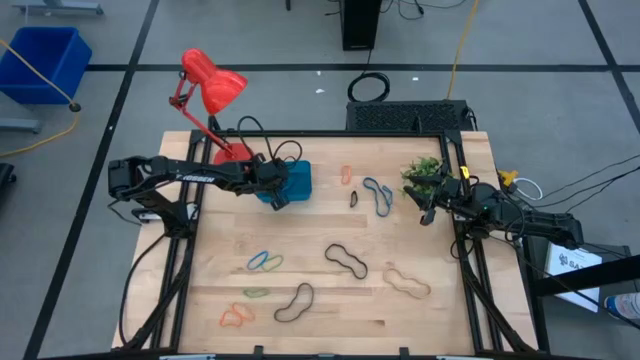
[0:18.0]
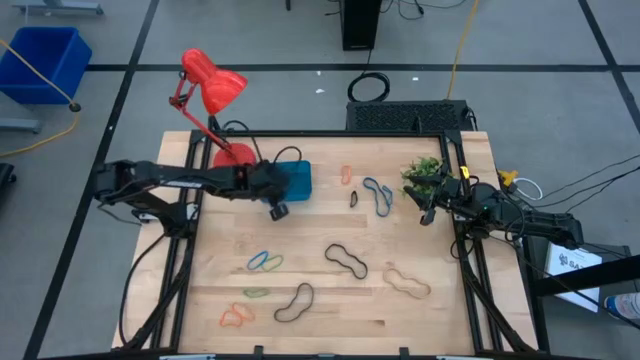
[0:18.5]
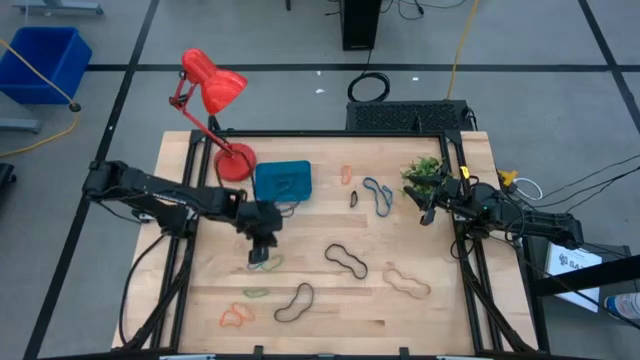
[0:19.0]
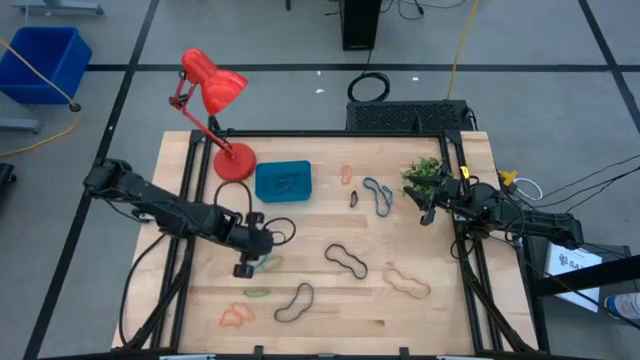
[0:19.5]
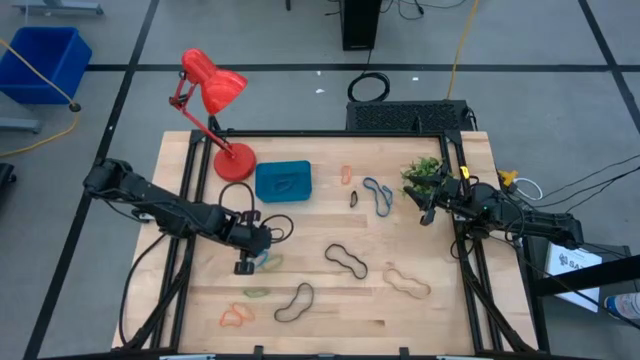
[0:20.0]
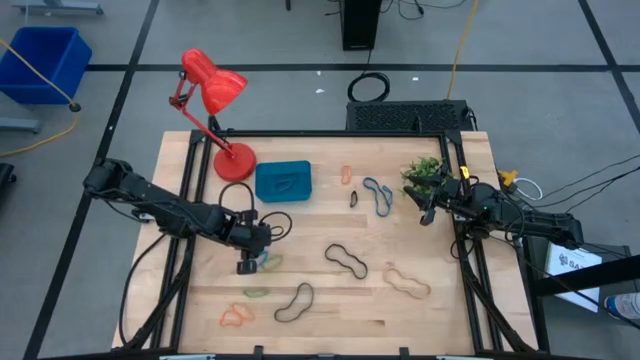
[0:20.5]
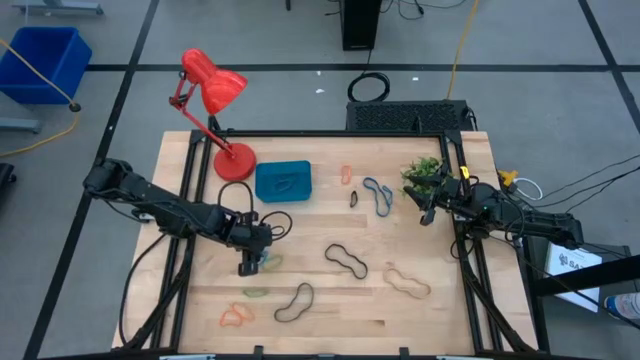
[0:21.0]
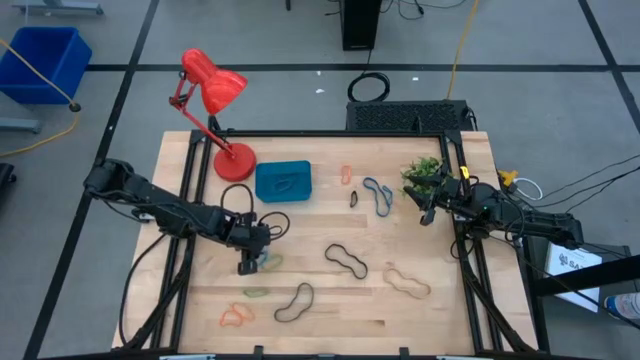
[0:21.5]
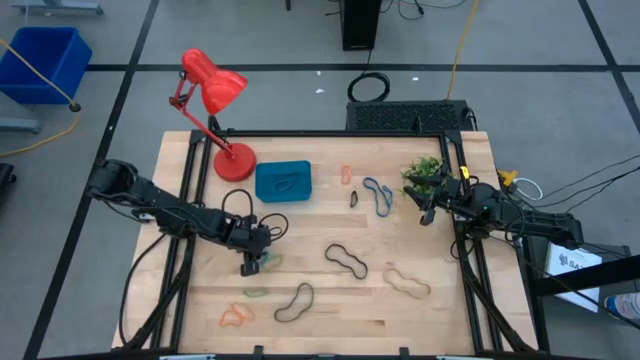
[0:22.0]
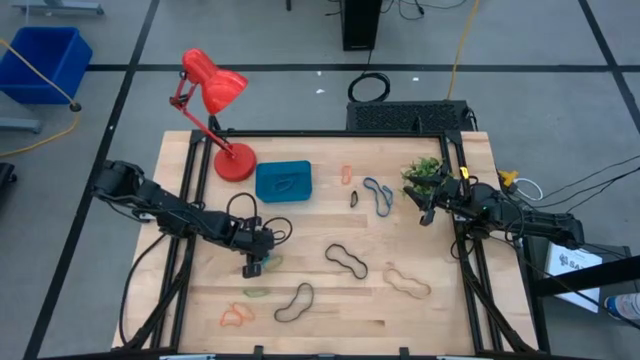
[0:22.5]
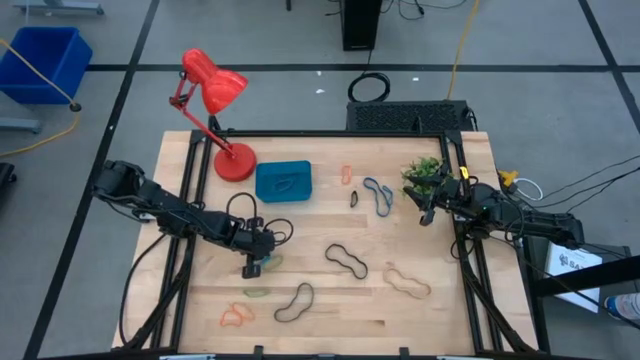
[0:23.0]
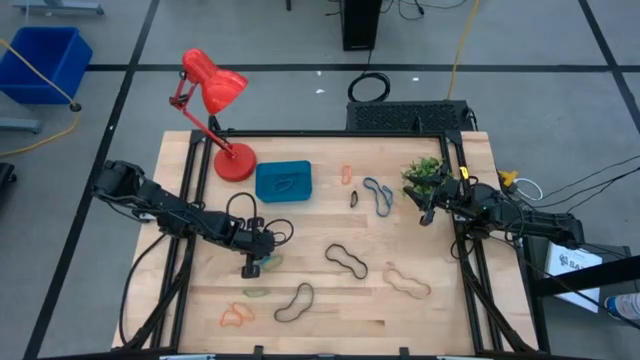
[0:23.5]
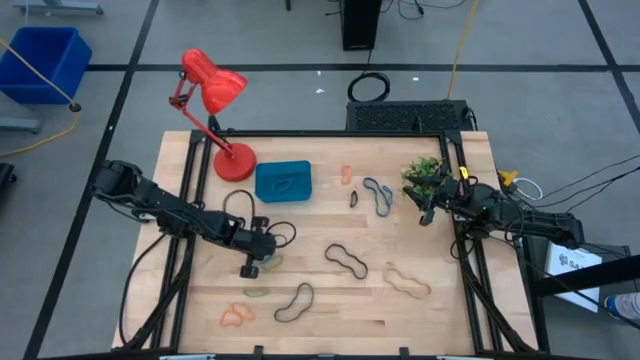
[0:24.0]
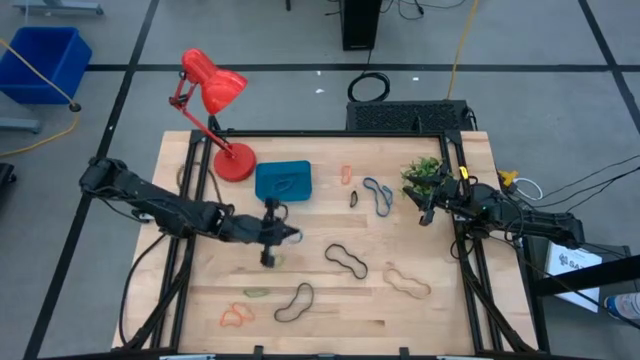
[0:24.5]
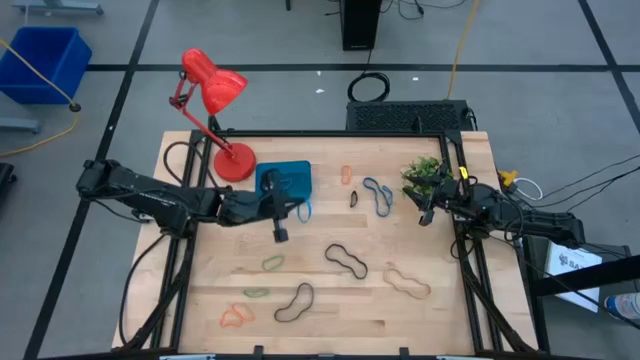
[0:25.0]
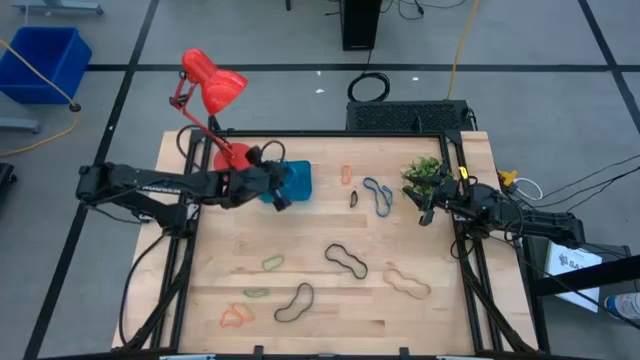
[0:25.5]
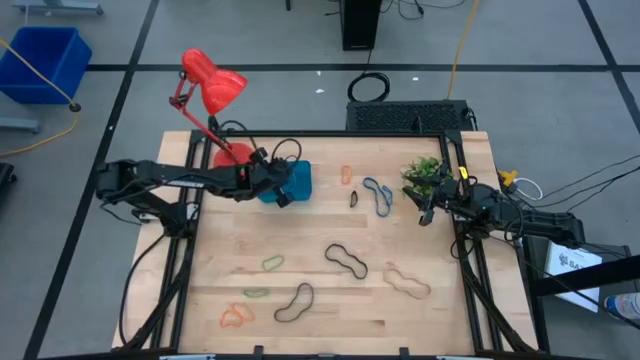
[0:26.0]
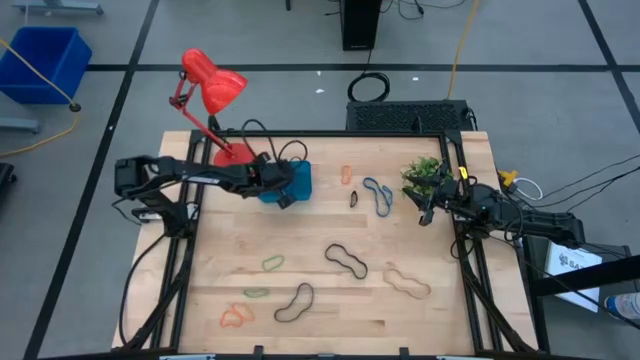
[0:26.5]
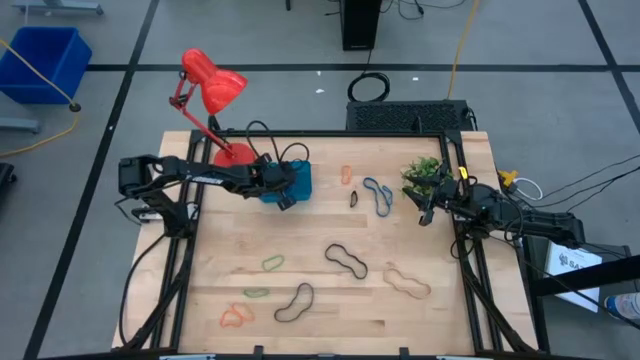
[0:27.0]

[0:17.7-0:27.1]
Task: Pick and place rubber bands into bin
Put the blue rubber band into the blue bin

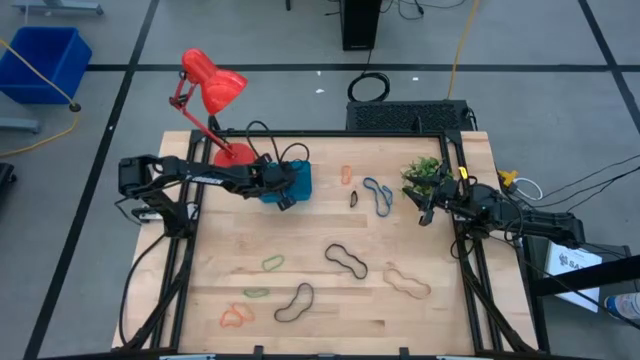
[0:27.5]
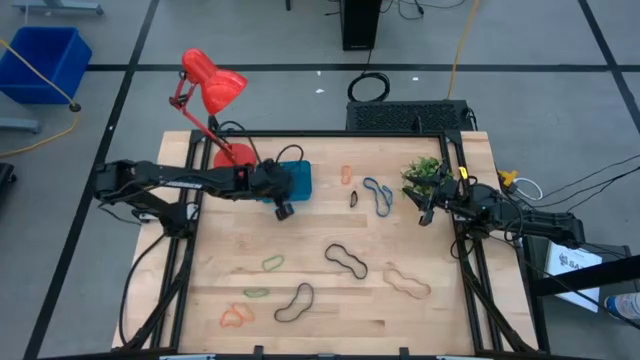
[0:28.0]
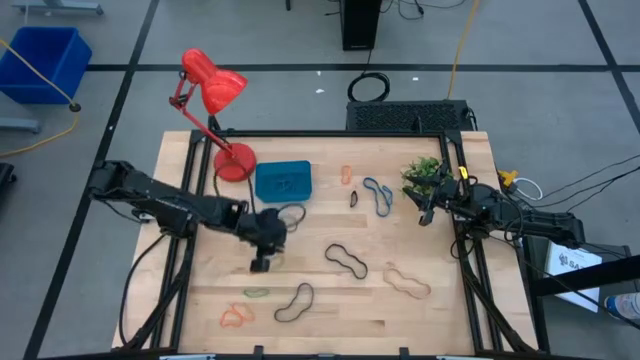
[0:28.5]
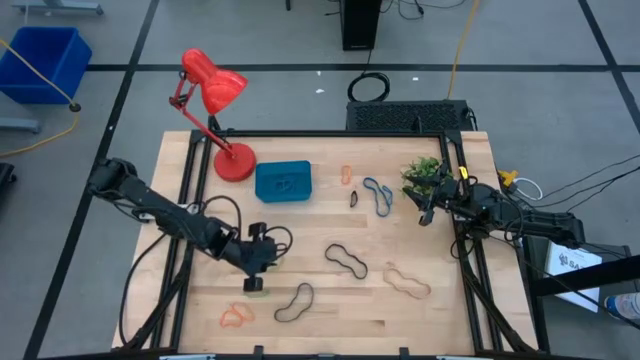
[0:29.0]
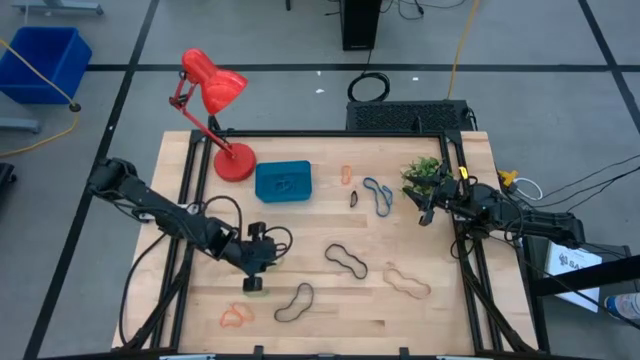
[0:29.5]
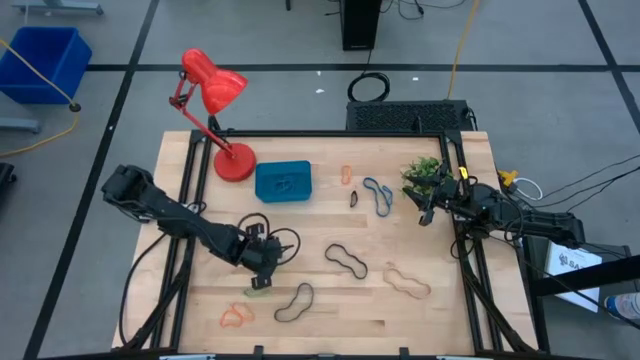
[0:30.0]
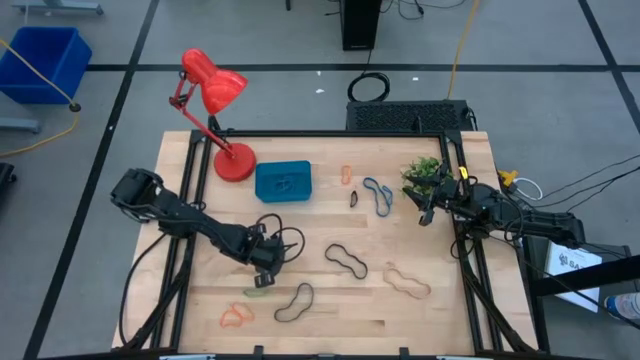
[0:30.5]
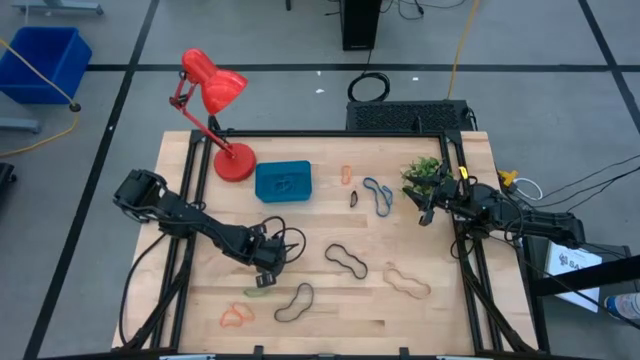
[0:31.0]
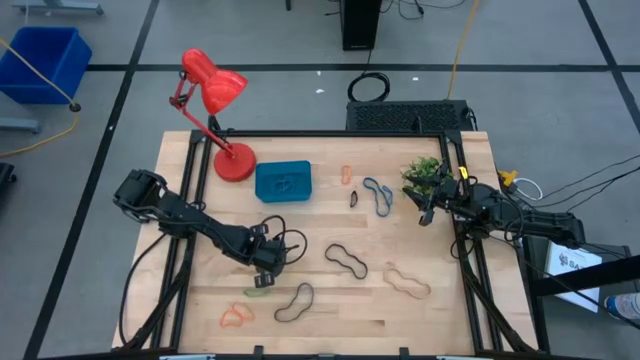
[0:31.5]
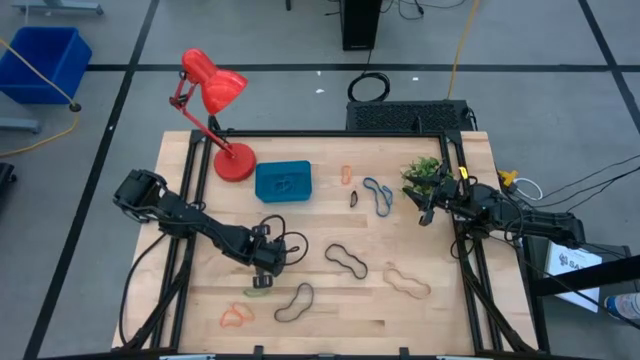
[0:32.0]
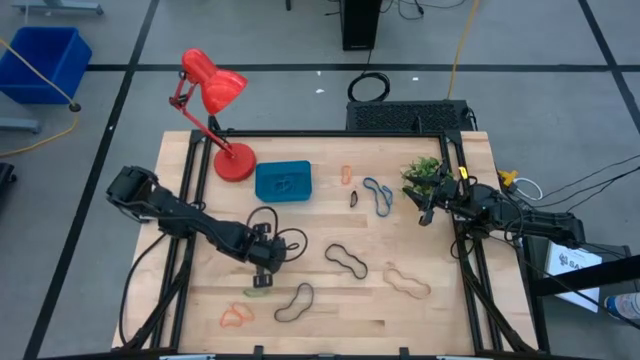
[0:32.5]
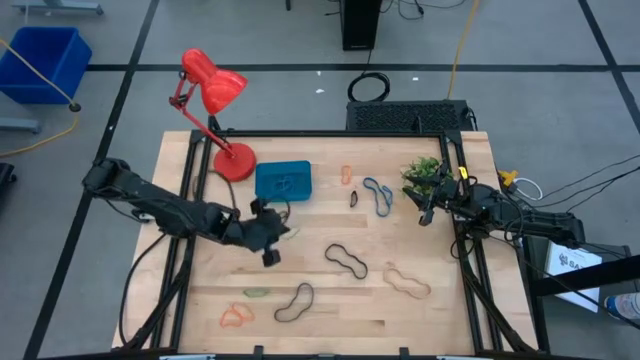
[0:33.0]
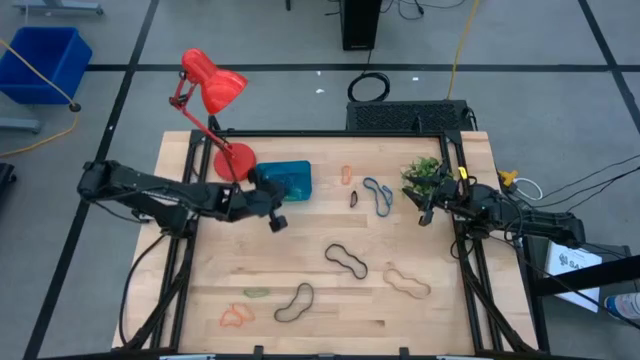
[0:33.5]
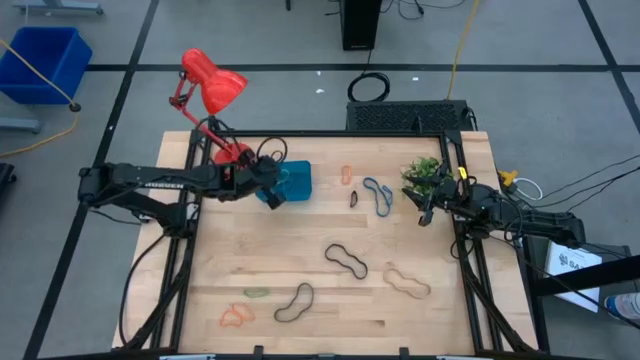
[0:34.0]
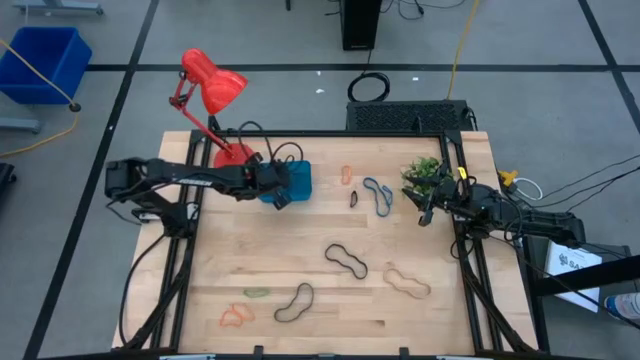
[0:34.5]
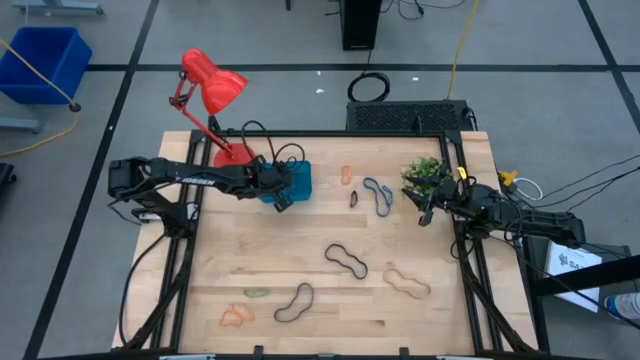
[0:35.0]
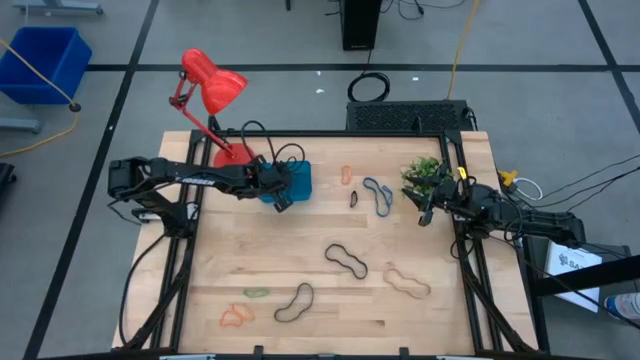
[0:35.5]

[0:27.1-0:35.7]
Put the green rubber band into the blue bin

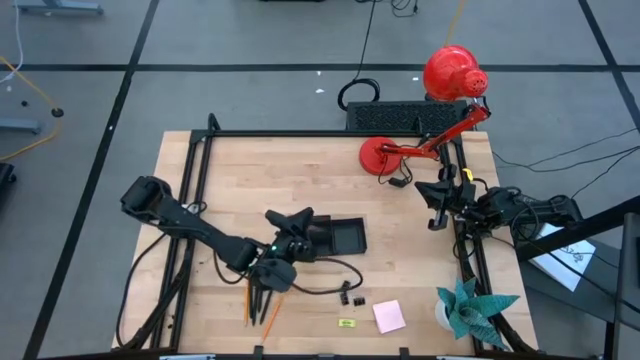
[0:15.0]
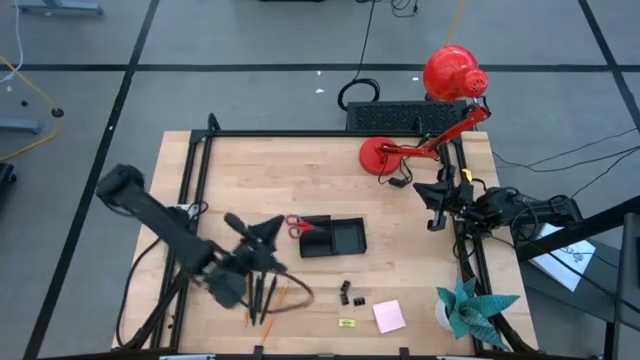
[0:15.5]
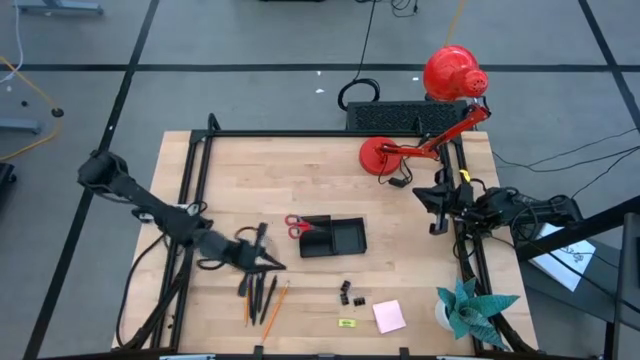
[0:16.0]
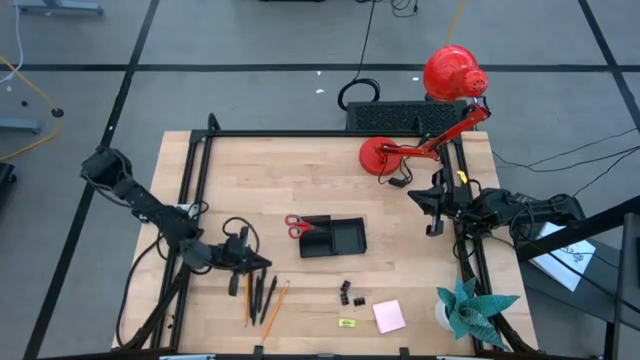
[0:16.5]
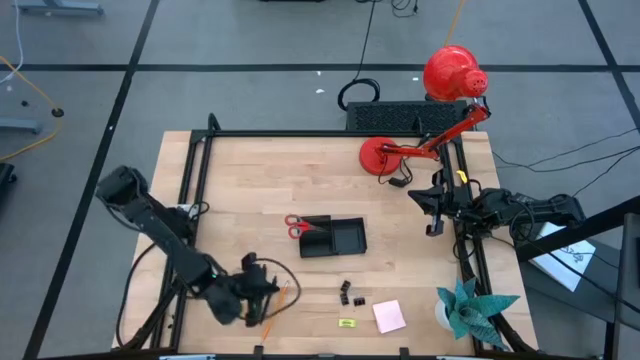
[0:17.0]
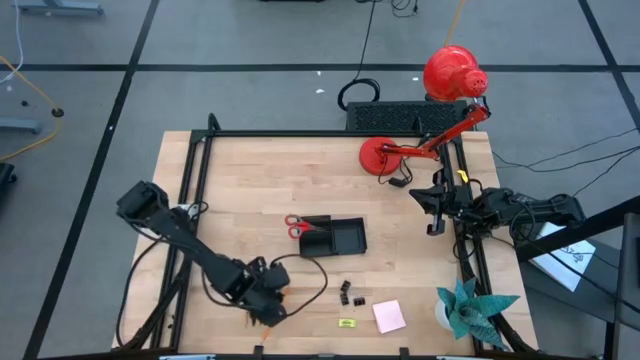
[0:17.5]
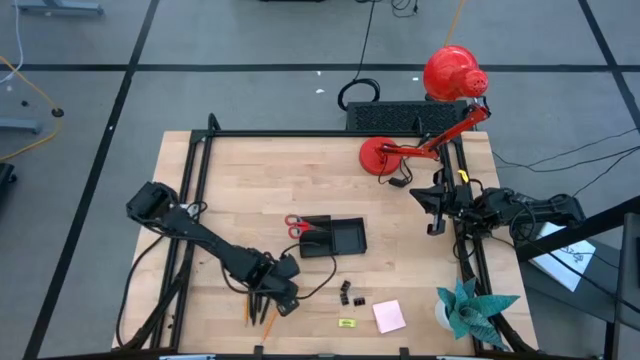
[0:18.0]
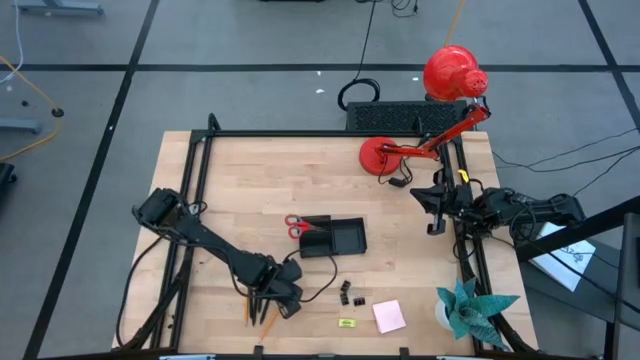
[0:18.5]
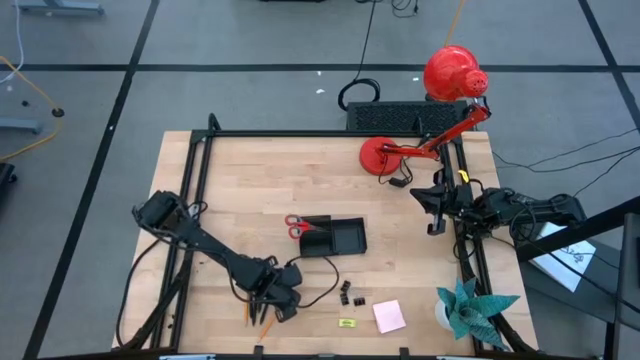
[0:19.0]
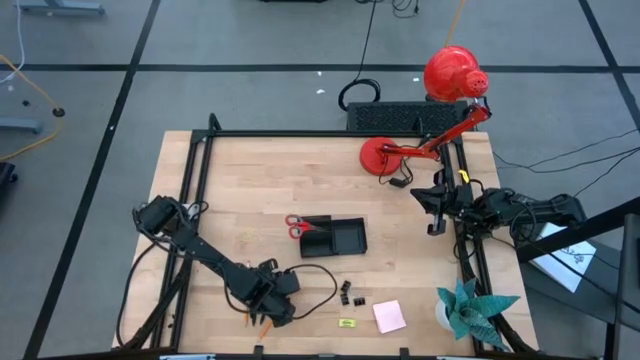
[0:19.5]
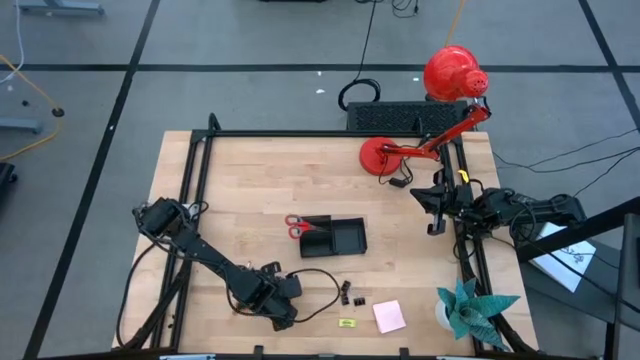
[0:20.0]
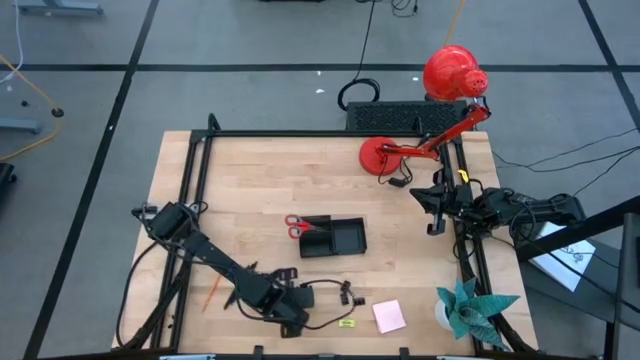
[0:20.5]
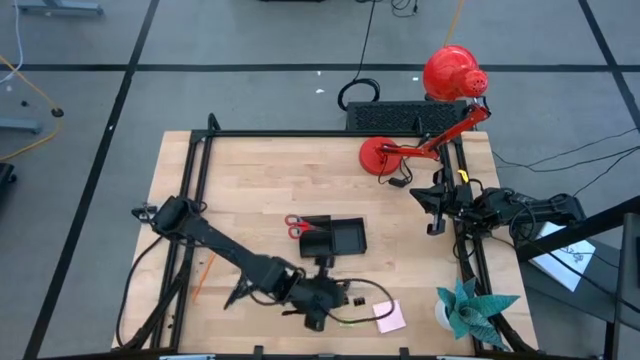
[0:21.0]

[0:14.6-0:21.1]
Task: Pick and place office supplies into organizer
Put the lower right pencil into the desk organizer
